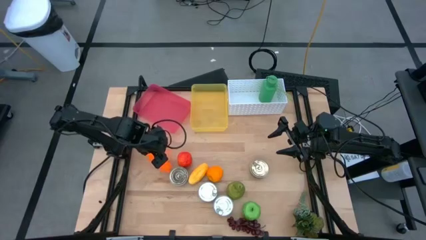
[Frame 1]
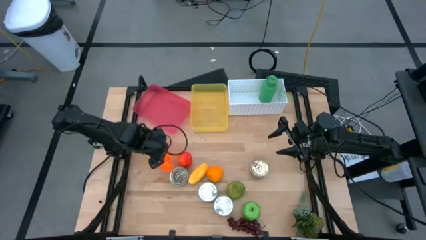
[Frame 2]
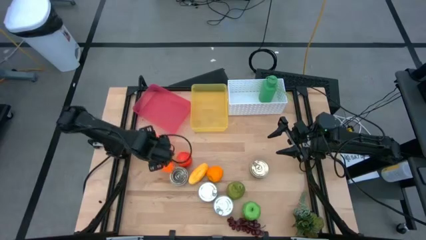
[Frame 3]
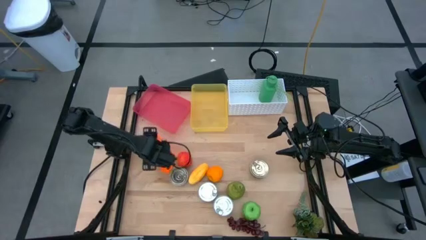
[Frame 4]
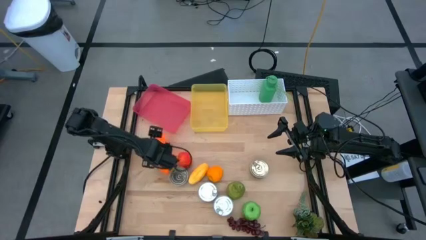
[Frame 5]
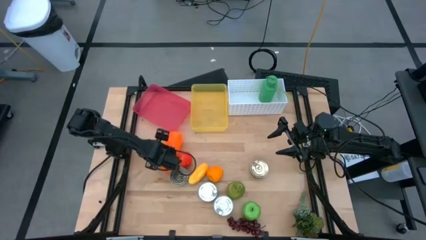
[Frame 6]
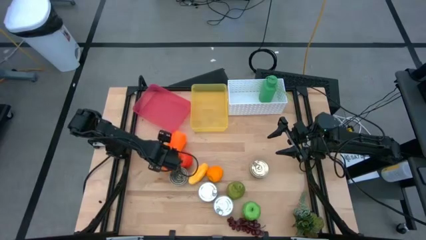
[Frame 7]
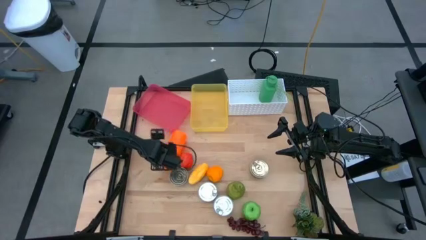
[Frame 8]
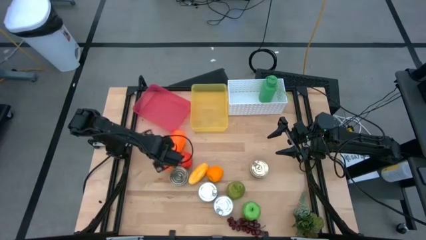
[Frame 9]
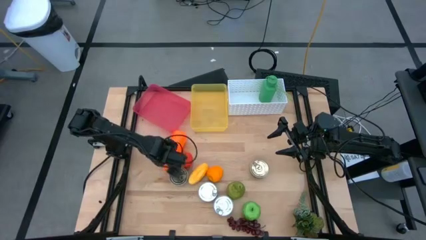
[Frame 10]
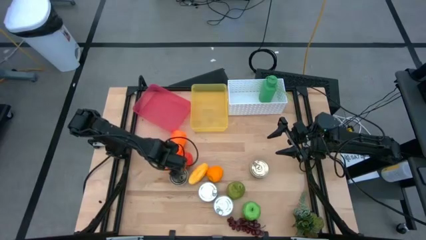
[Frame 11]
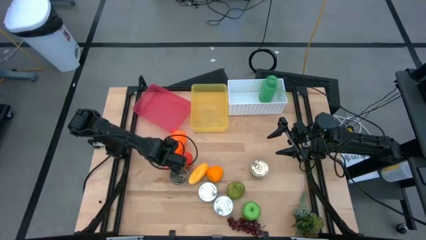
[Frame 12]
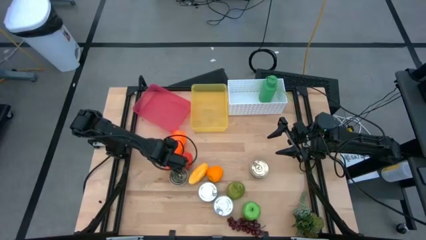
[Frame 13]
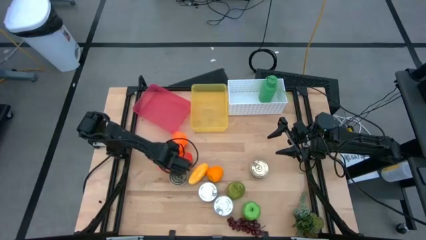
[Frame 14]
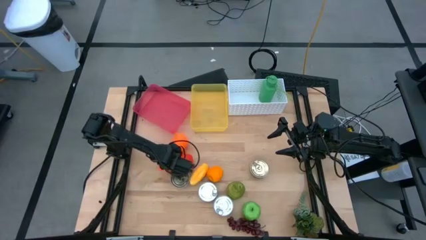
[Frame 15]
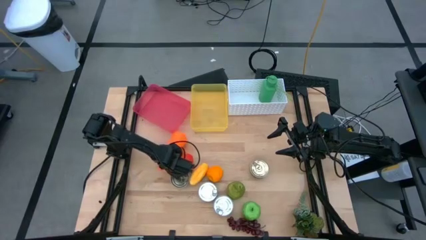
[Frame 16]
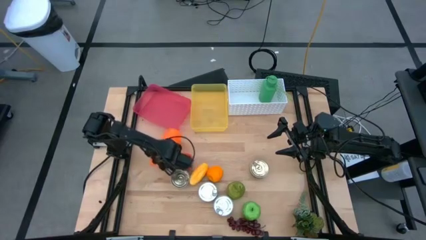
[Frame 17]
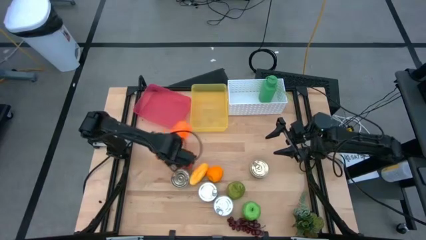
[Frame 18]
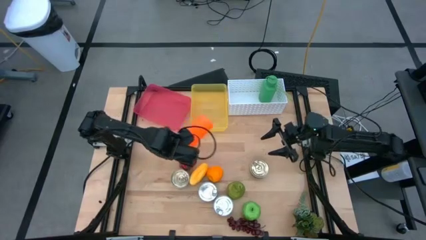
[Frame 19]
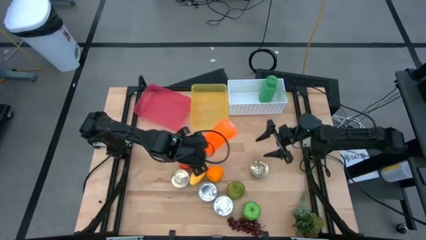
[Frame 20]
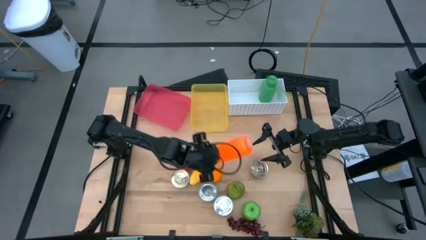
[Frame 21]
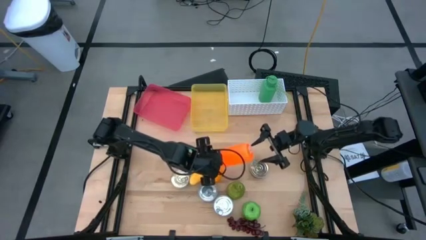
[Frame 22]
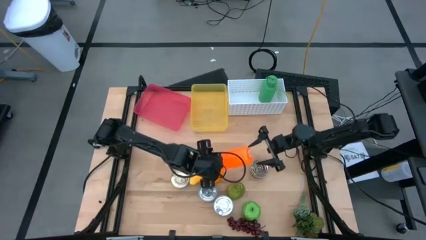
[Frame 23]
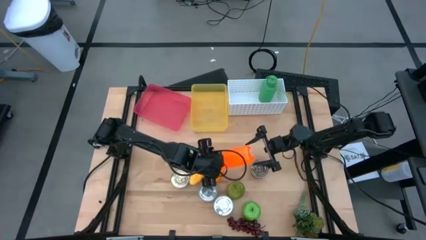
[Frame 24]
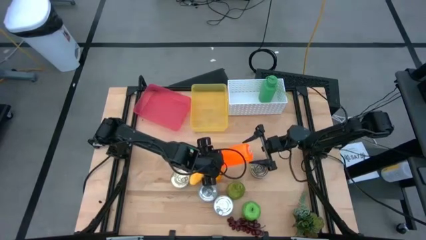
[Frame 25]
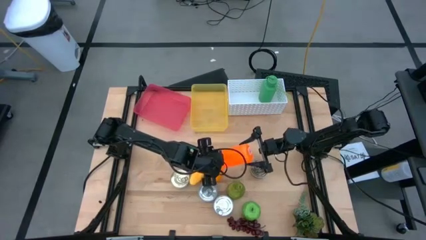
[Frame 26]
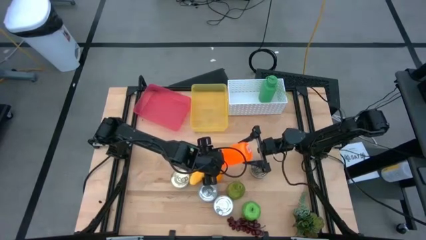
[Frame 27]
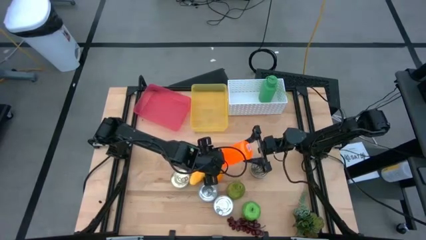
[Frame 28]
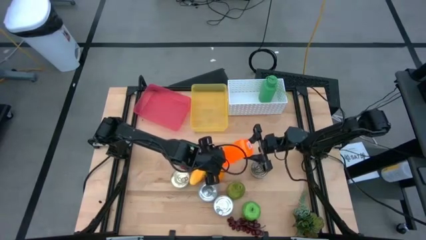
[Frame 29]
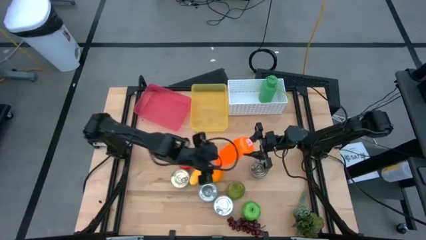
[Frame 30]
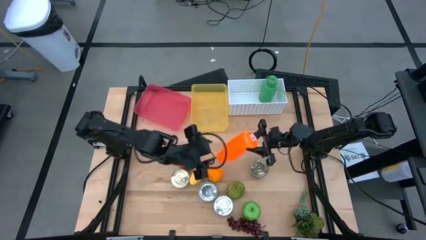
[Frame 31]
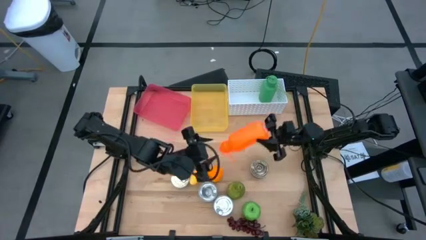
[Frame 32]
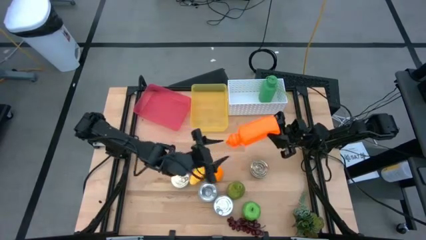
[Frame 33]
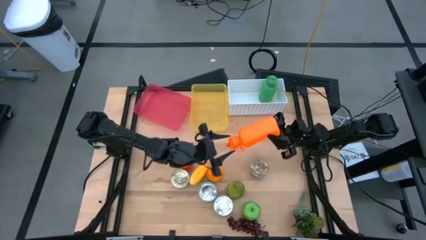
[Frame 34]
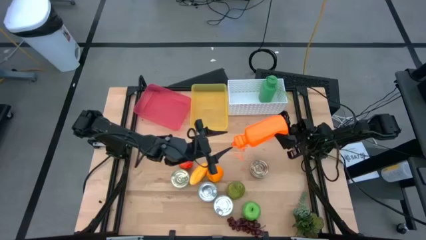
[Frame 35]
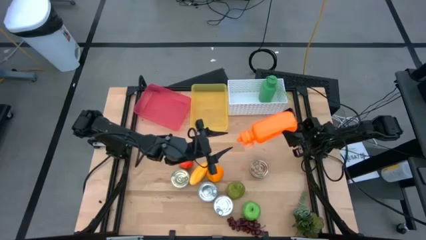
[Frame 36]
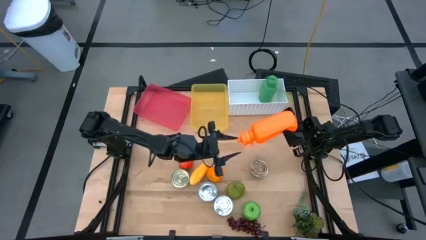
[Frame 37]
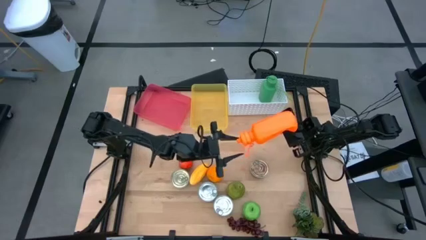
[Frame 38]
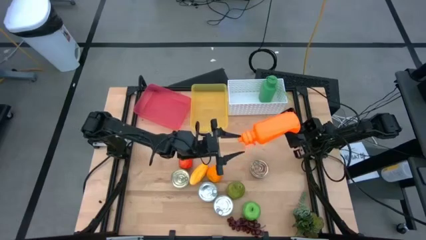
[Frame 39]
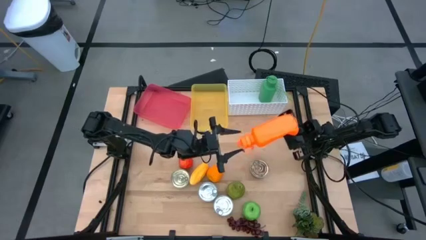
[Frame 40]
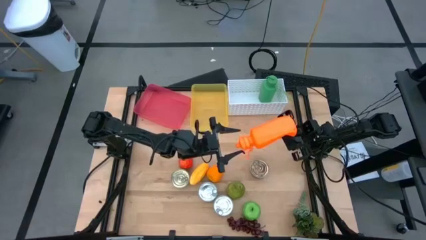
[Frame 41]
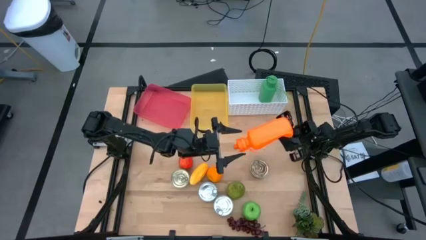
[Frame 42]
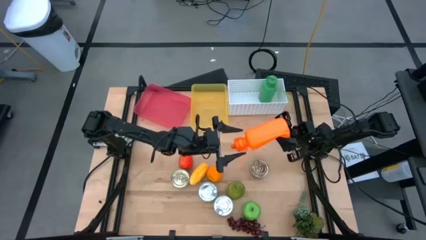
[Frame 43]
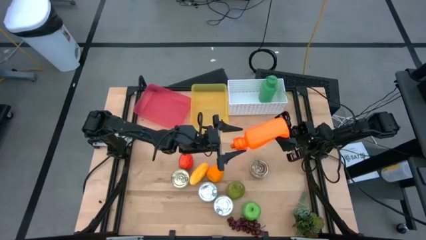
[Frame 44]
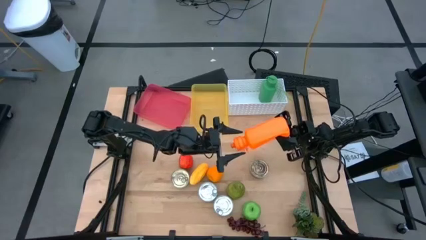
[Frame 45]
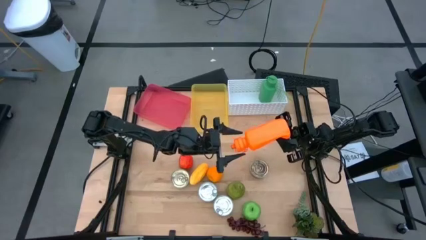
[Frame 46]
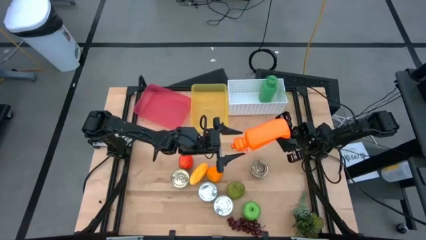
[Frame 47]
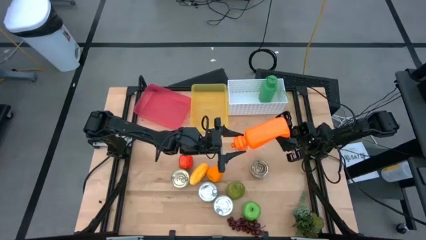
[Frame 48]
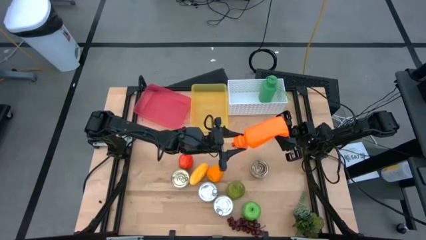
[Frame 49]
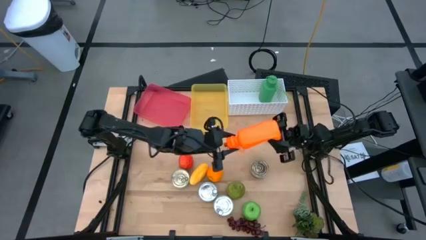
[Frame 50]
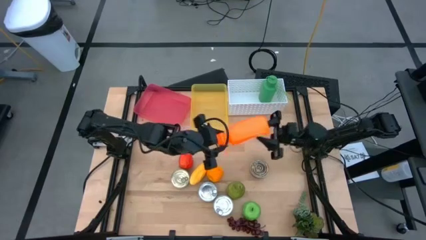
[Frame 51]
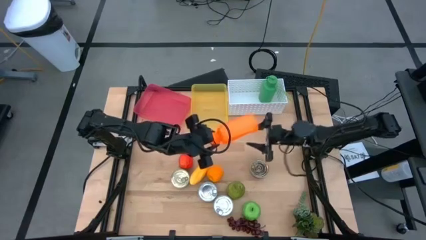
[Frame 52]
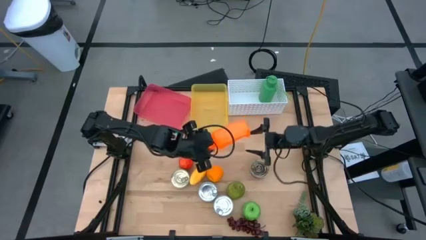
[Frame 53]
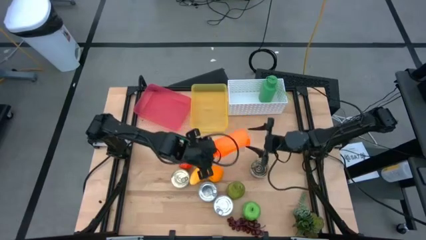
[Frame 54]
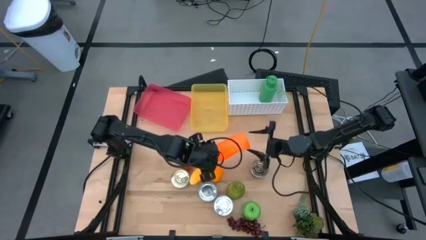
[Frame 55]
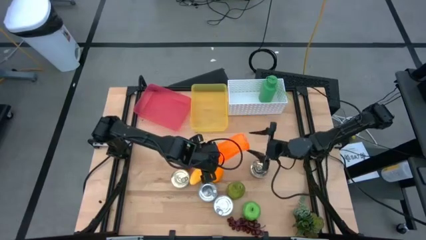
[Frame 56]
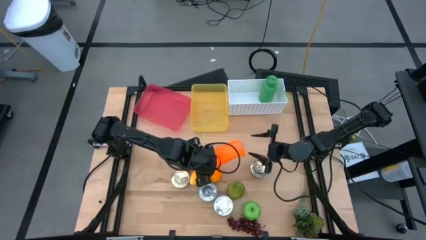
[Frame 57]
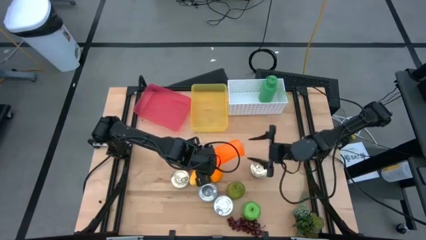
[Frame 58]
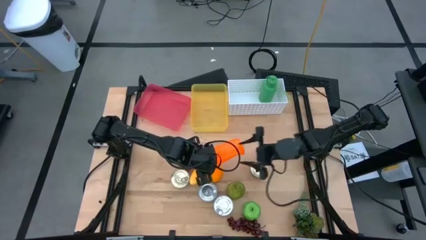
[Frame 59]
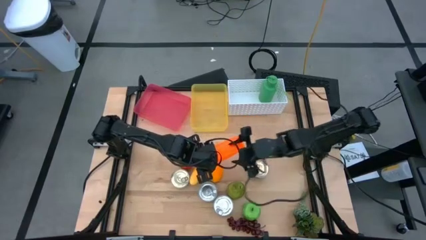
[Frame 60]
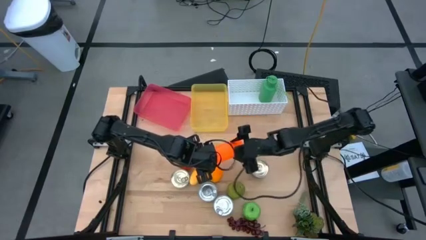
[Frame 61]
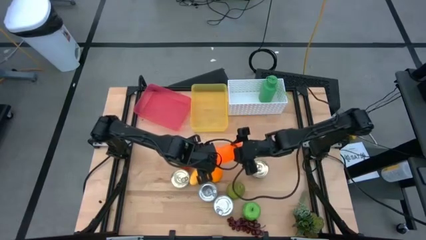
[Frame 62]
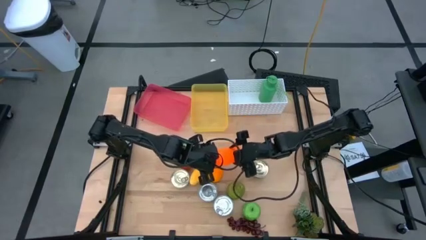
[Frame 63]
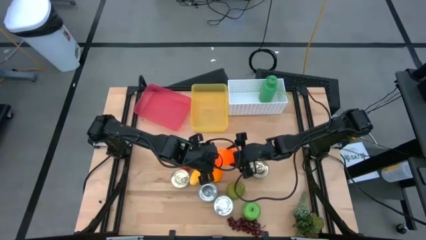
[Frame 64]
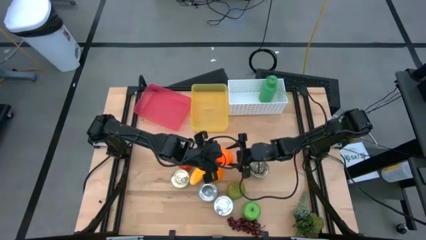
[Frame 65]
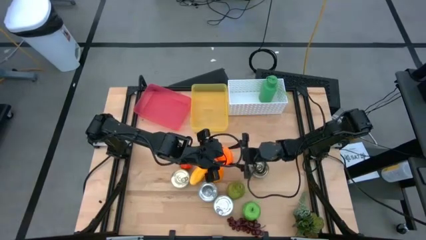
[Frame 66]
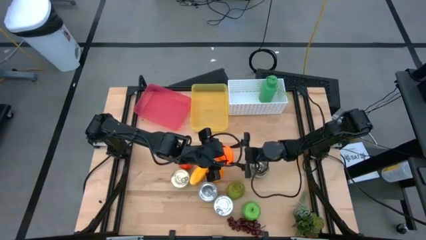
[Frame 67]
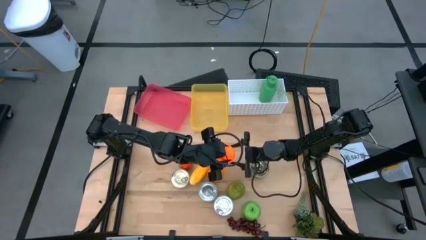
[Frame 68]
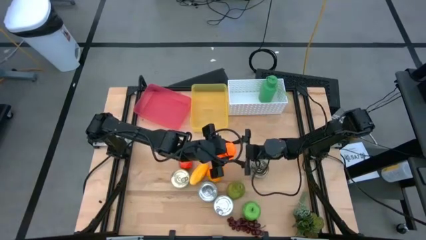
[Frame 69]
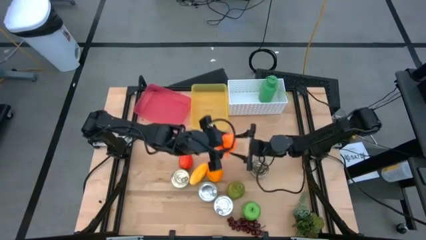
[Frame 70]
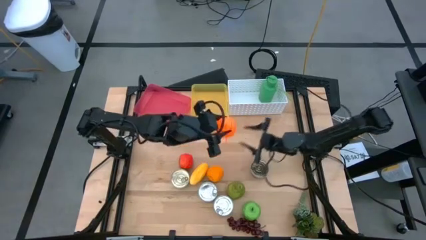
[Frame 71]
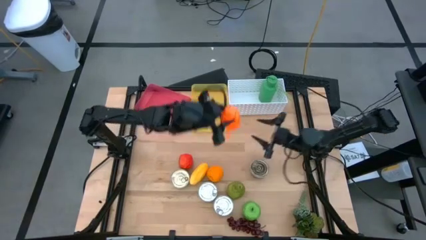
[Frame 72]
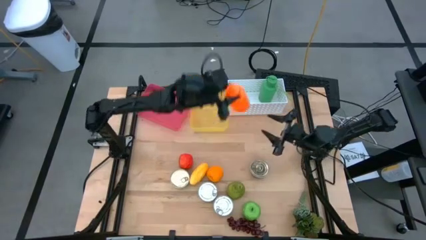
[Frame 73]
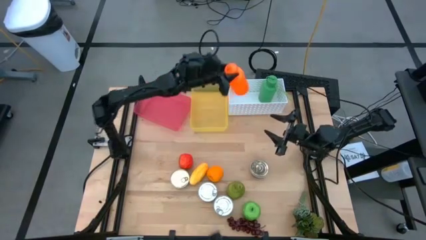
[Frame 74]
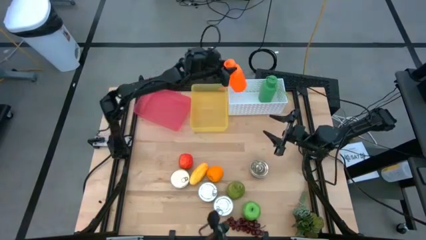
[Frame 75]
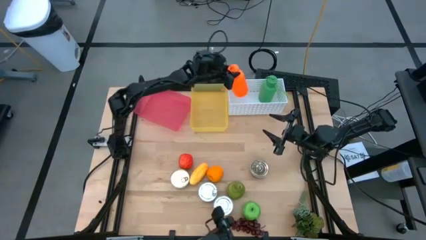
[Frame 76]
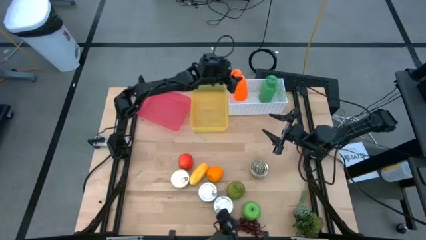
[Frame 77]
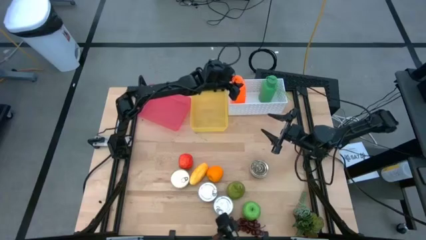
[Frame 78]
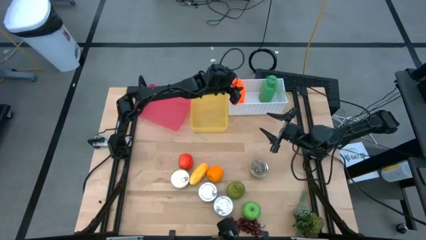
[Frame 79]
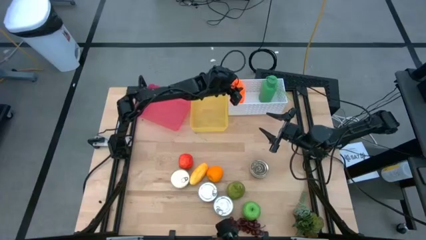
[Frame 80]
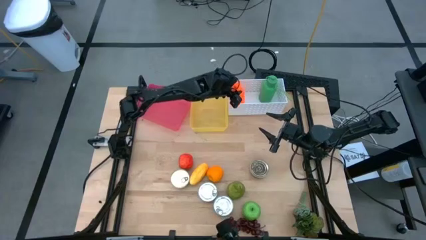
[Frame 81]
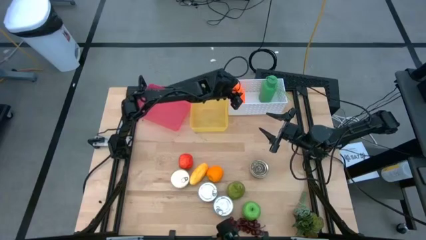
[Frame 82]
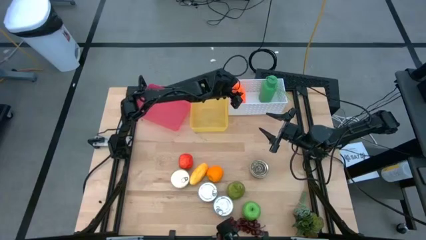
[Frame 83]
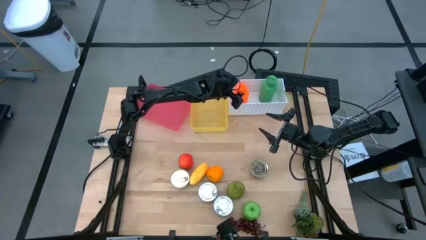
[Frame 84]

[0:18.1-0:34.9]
Task: Pick & Place Food Item
Put the orange water bottle into the white bin
